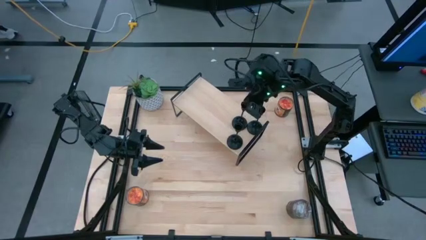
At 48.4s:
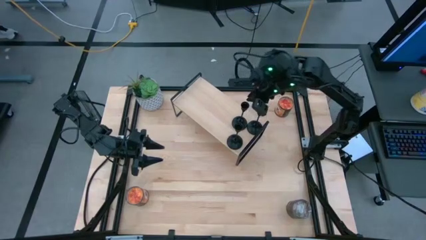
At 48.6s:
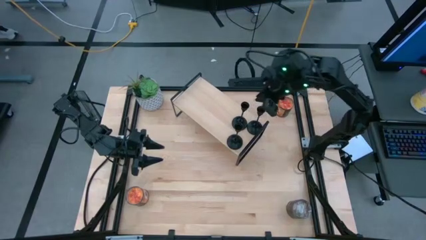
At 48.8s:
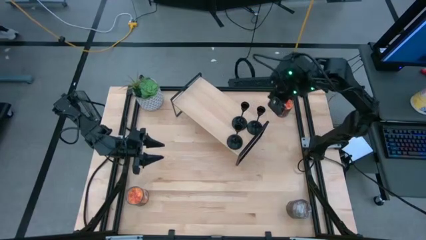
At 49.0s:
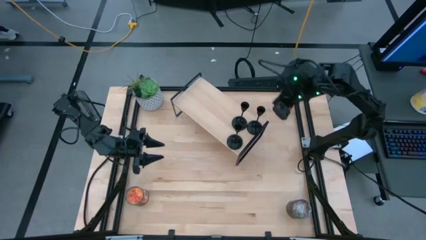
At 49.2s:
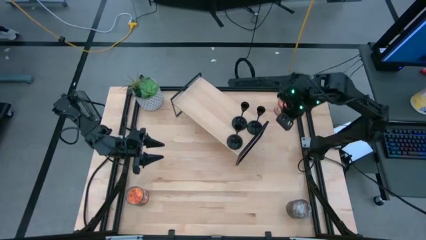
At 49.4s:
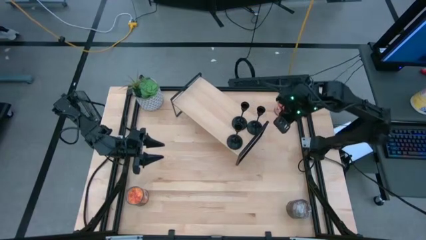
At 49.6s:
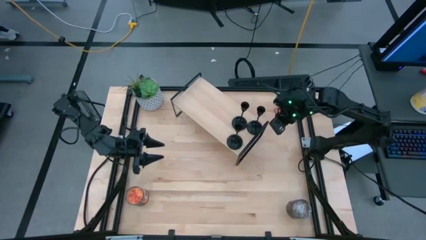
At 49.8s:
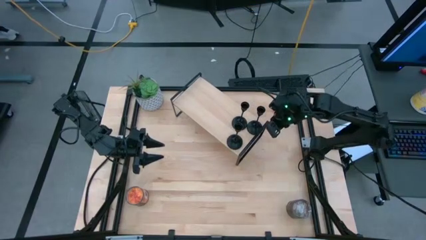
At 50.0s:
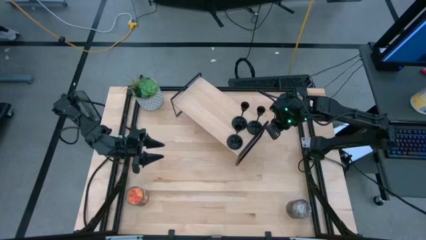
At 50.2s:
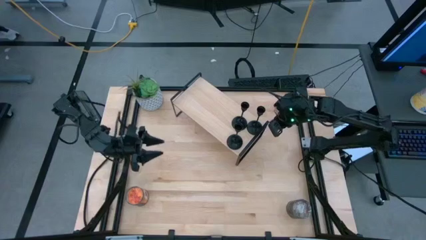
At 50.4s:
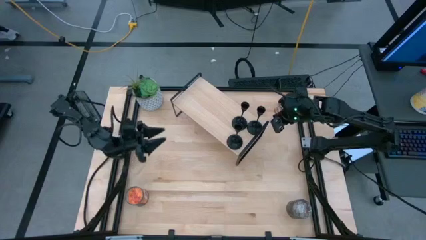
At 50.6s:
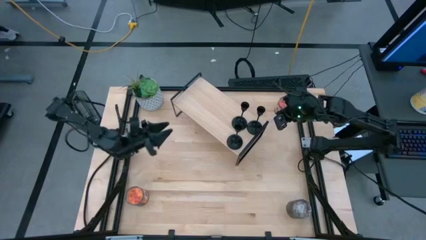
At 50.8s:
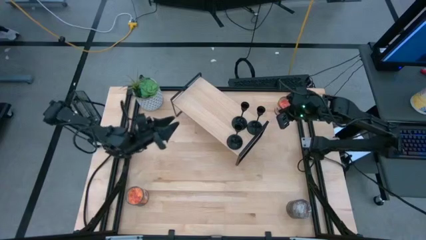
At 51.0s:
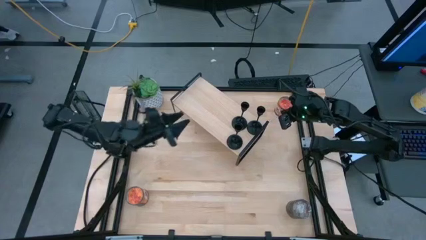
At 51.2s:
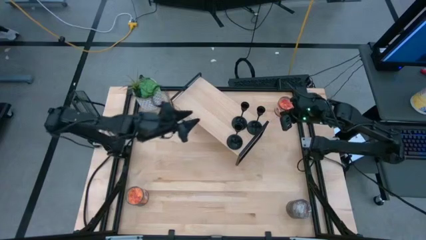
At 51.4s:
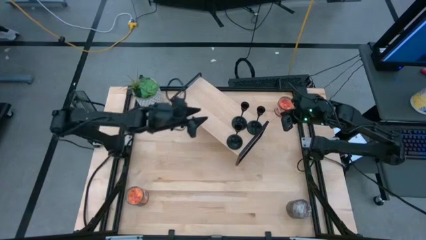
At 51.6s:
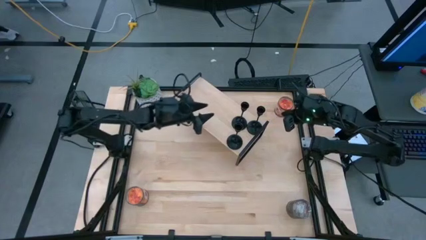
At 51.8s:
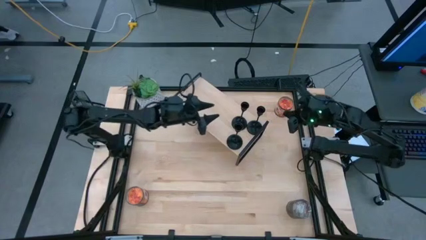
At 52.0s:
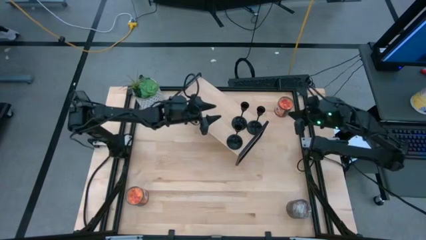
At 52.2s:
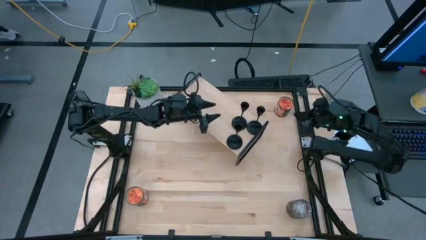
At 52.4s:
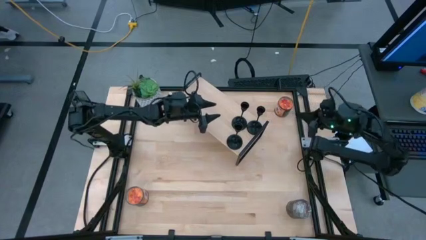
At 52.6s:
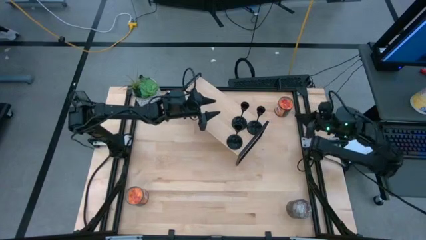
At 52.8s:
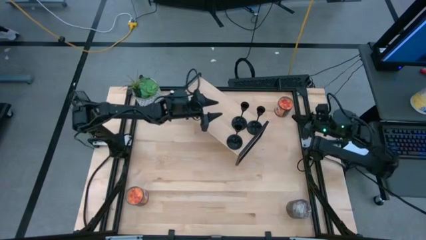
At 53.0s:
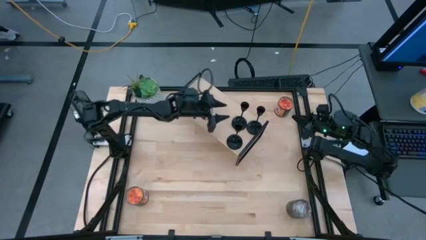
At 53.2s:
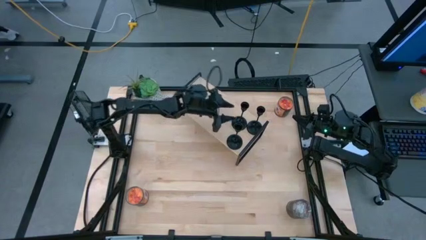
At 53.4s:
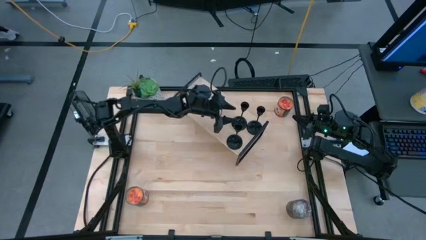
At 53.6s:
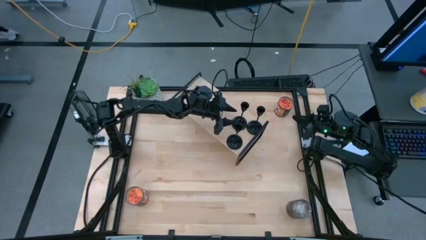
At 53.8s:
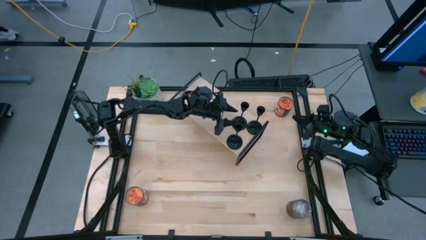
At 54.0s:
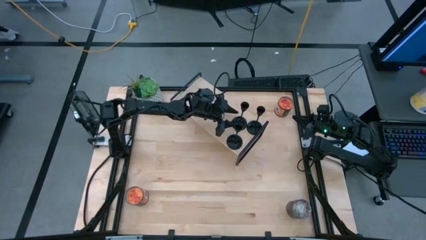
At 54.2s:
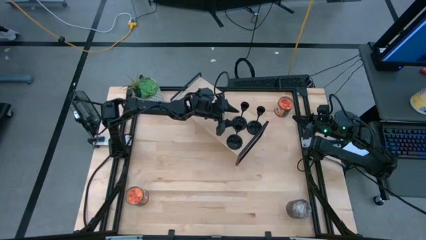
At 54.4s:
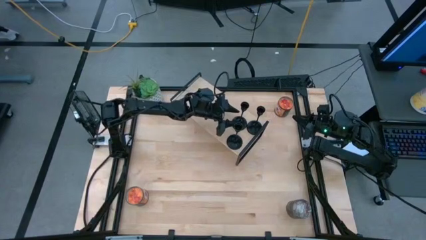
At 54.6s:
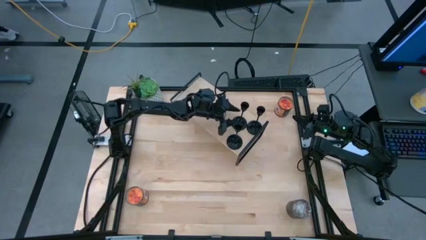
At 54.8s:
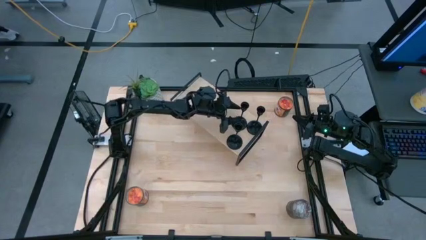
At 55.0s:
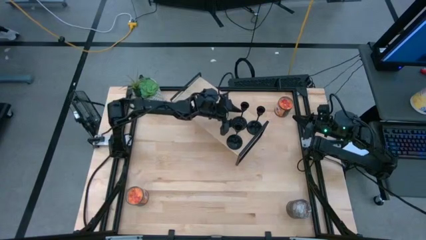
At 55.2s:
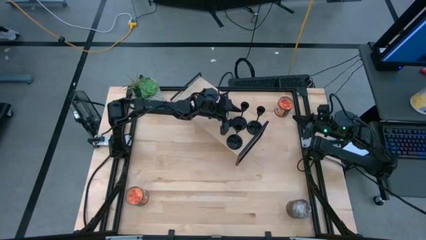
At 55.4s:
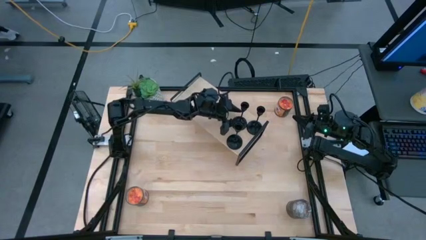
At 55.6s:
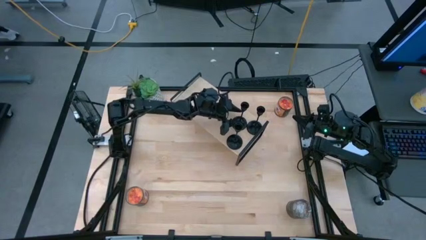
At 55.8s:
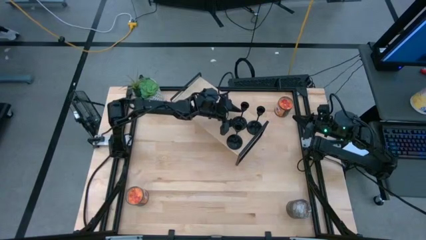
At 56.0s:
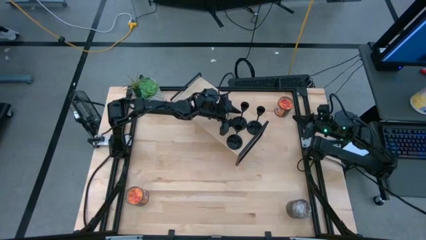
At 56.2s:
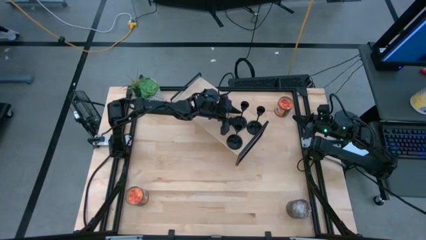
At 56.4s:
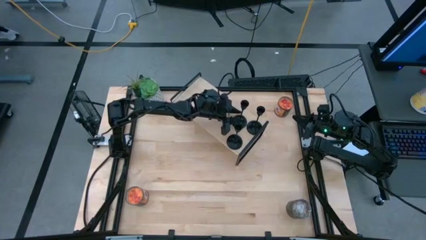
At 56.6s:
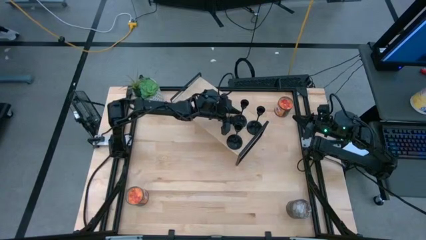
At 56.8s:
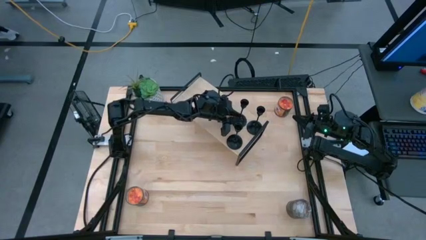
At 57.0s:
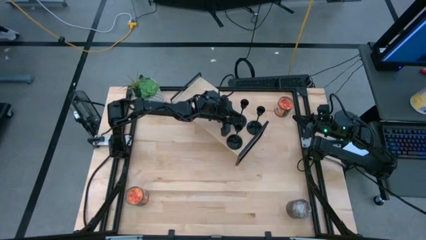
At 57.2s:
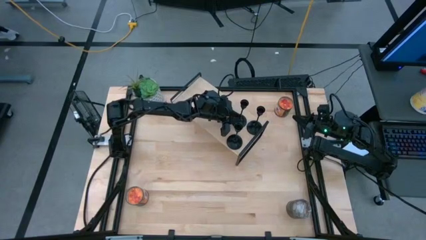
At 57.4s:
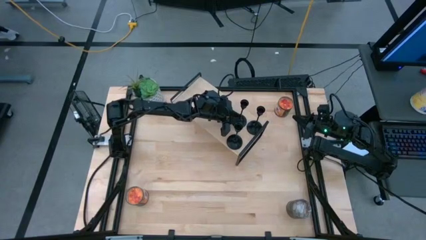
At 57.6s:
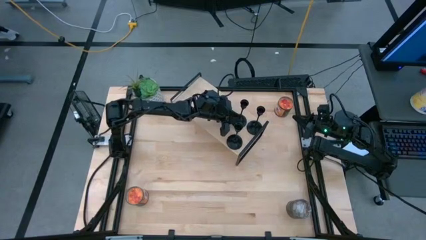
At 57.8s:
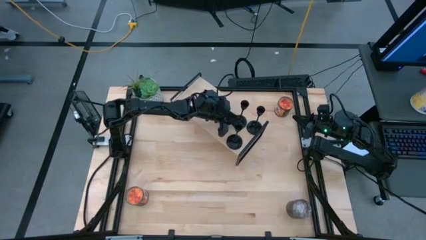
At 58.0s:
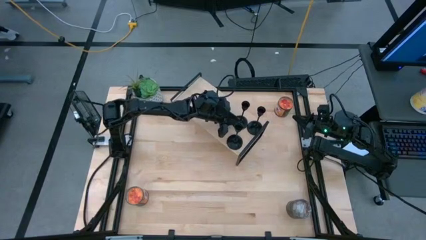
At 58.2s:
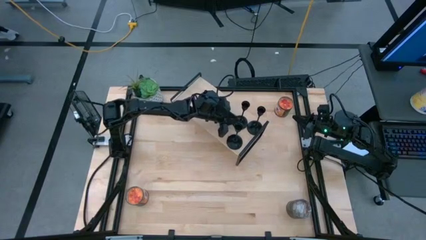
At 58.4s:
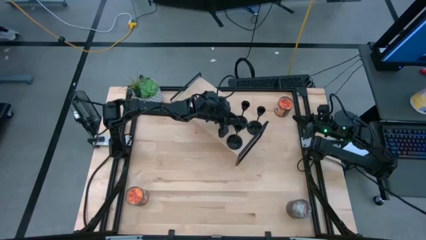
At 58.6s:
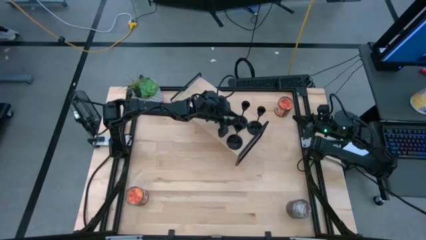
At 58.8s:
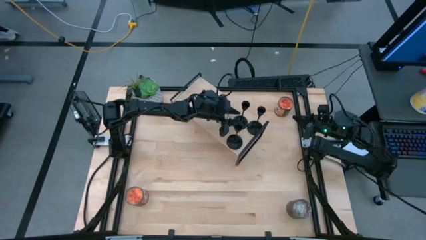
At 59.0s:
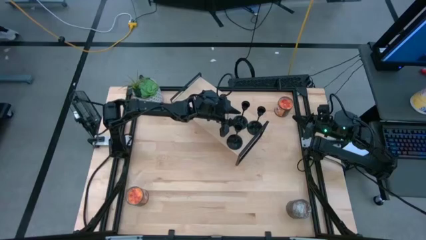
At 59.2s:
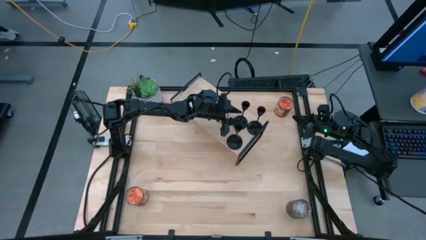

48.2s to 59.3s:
Task: Pick & Place candle stick holders
Adjust the black candlestick on the shelf
